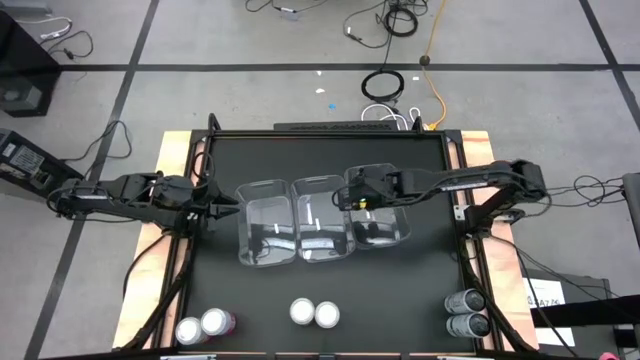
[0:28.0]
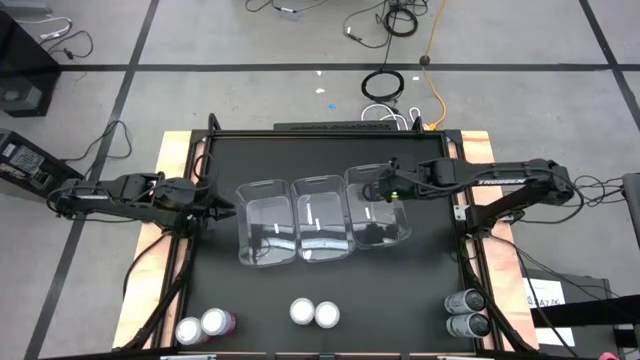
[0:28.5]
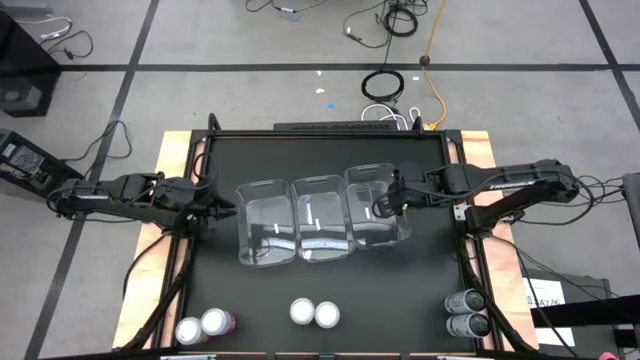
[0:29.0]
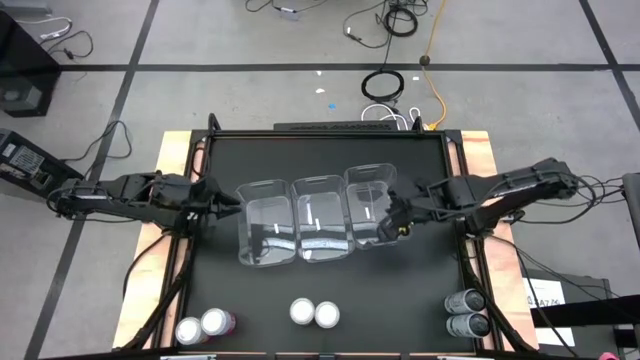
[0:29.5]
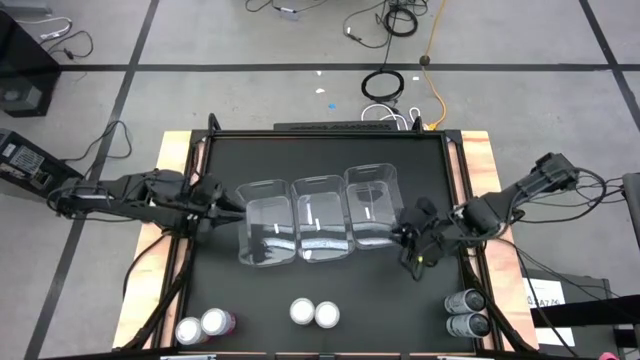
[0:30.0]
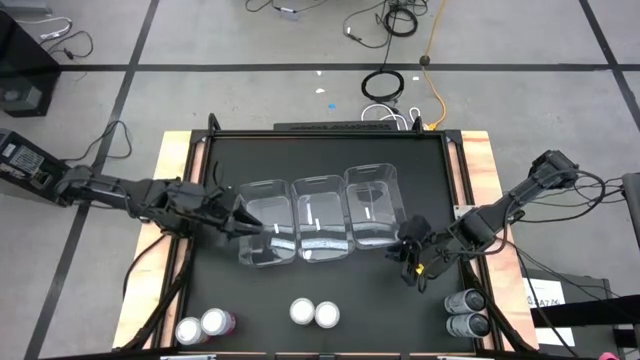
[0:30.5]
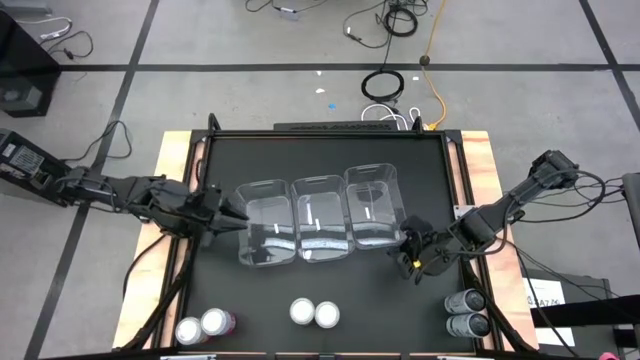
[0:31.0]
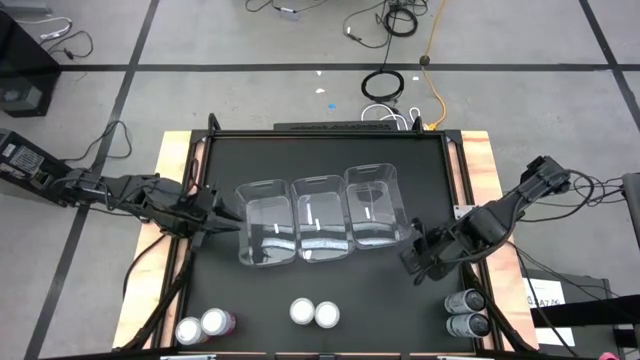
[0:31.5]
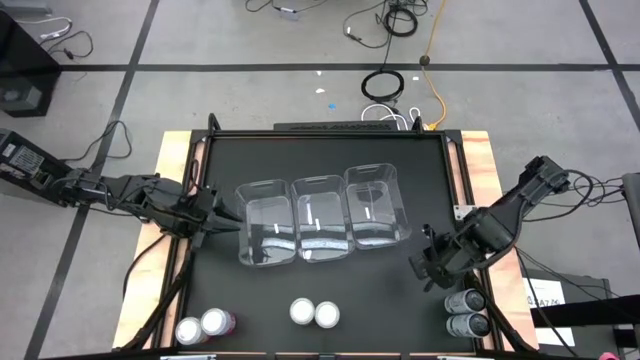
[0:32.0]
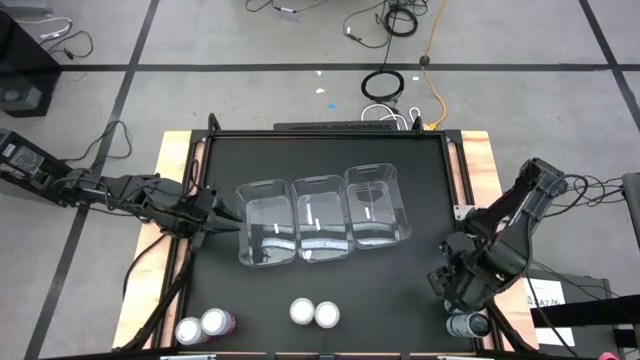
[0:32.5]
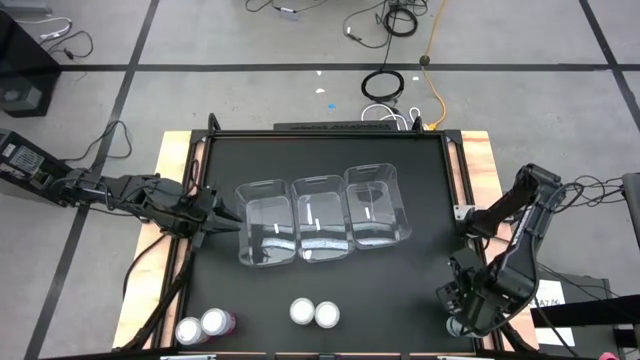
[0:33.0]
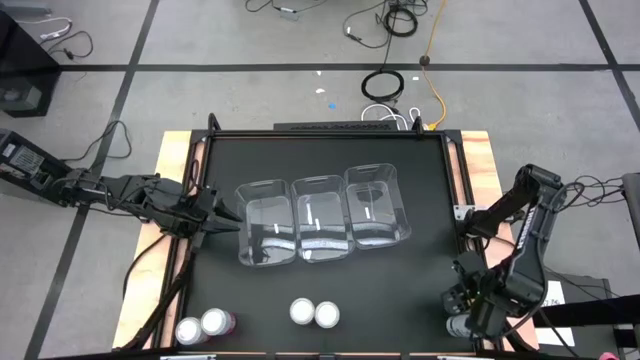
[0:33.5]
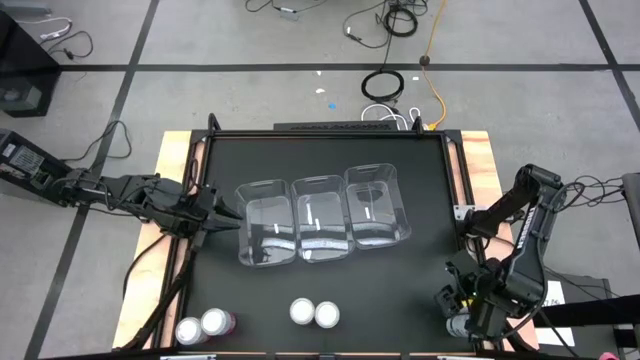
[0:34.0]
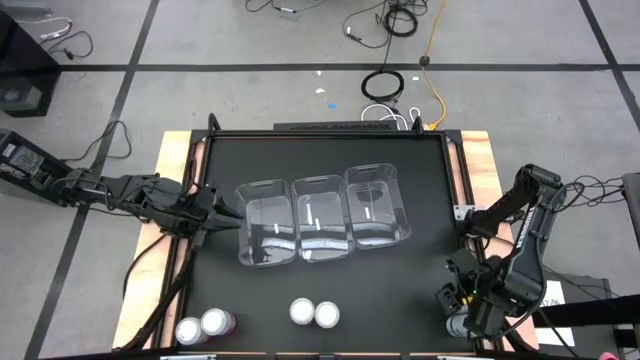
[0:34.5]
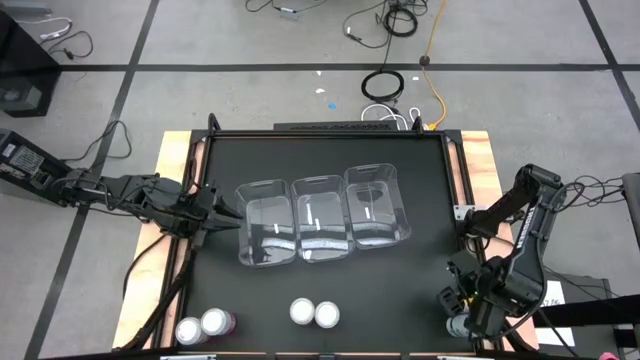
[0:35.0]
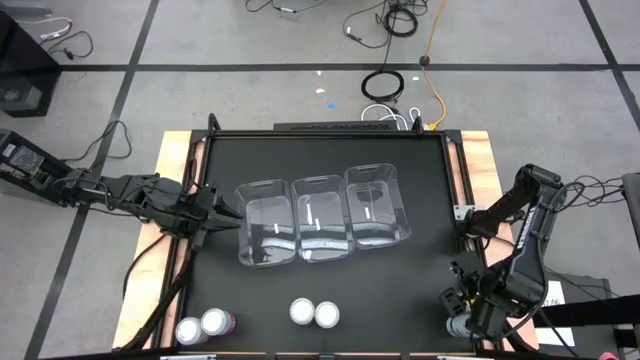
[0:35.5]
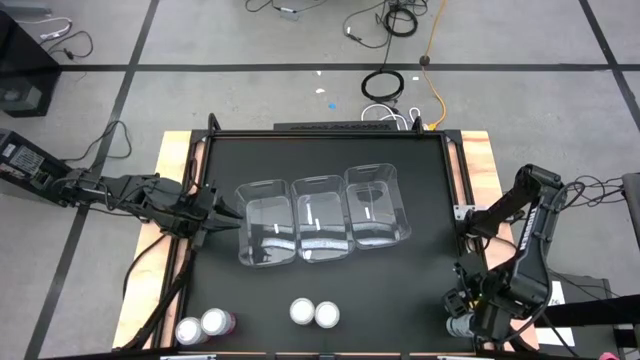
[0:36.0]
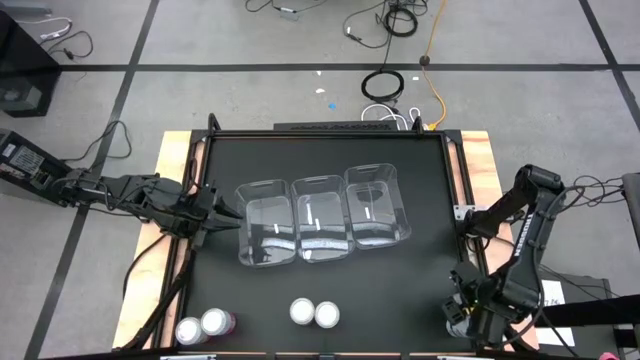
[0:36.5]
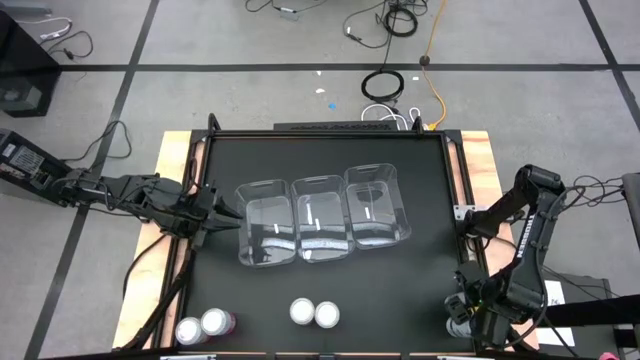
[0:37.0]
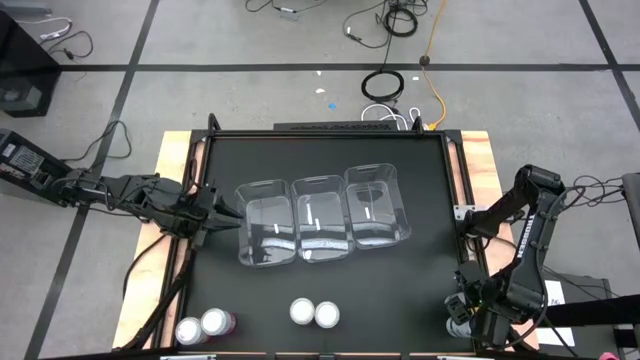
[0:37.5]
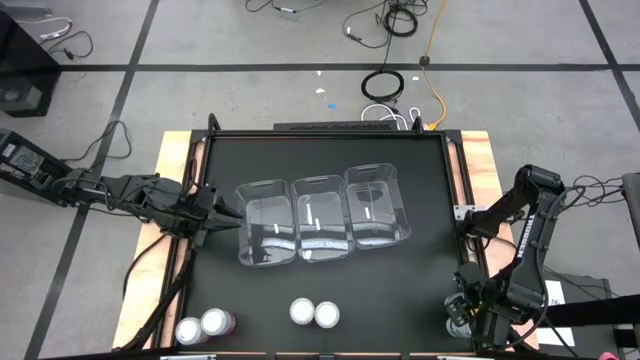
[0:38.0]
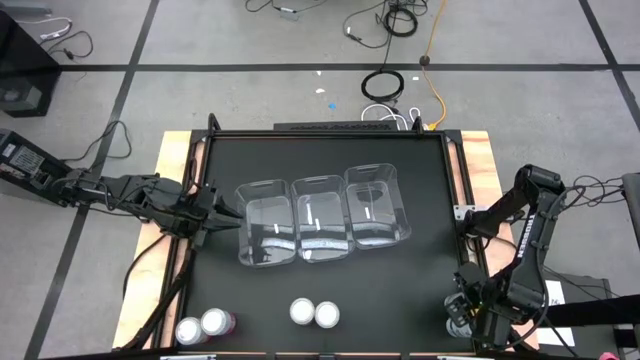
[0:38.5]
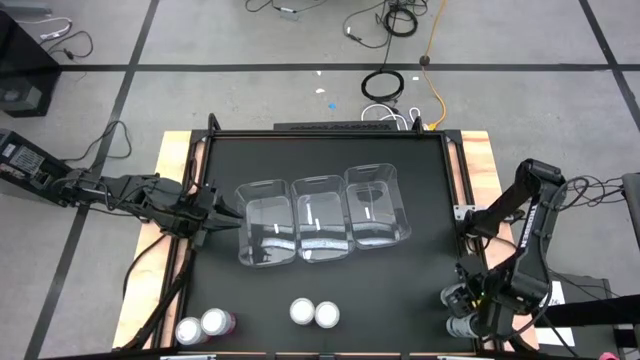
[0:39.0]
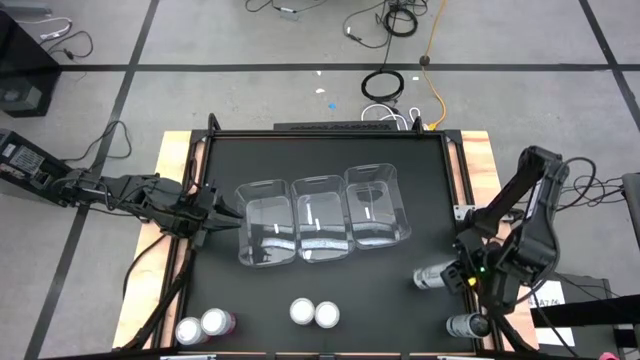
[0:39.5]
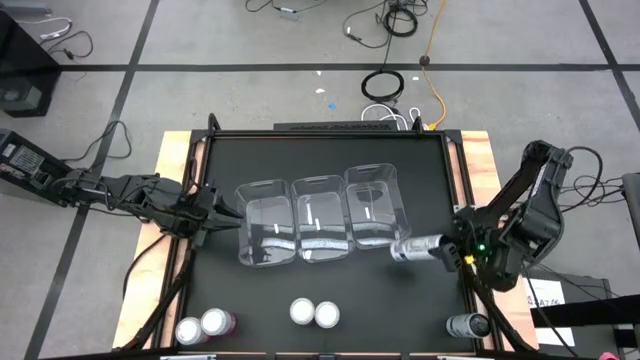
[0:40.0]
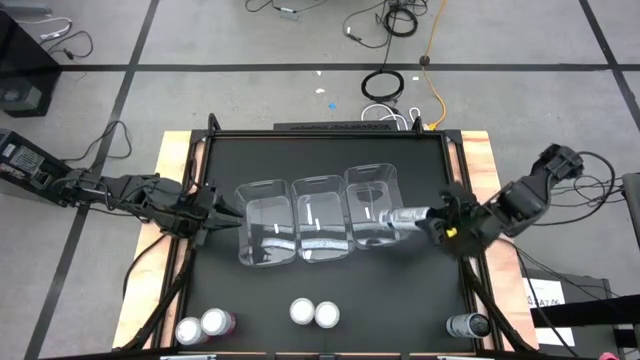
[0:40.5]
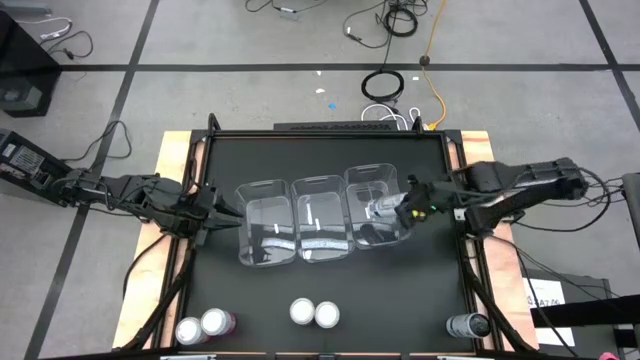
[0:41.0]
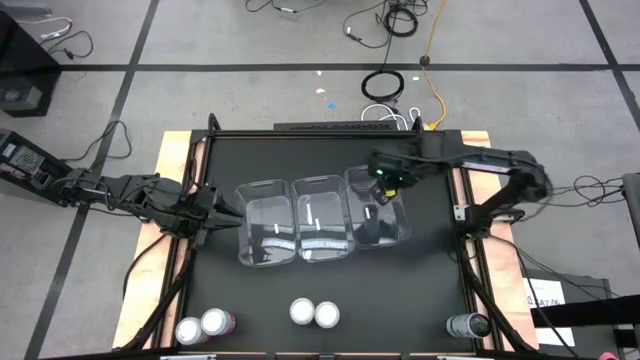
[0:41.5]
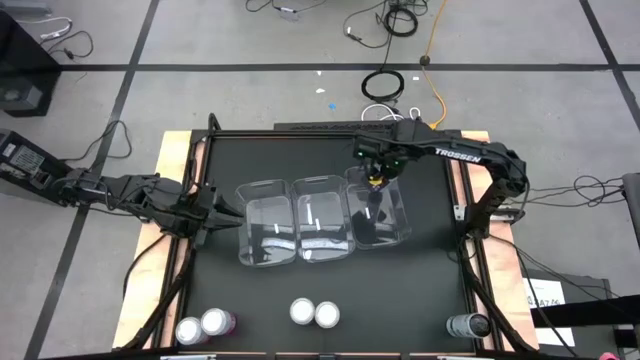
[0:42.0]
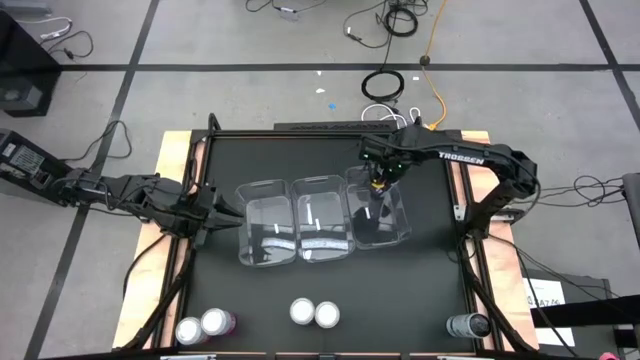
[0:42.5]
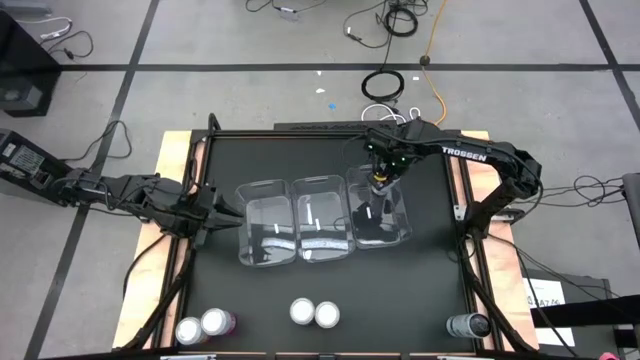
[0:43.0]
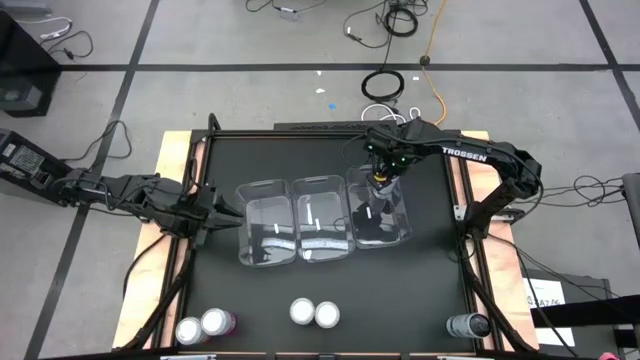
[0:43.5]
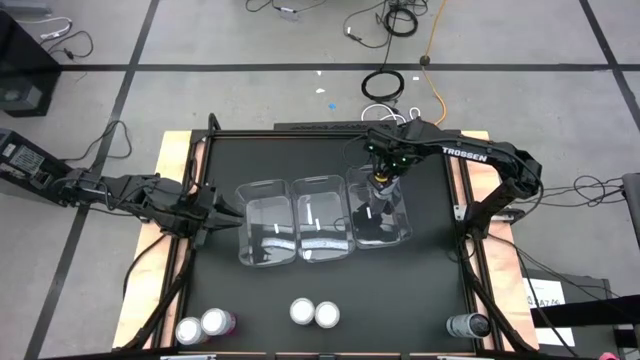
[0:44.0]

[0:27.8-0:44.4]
Task: Sort soda cans
Put the top black soda can into the right transparent bin

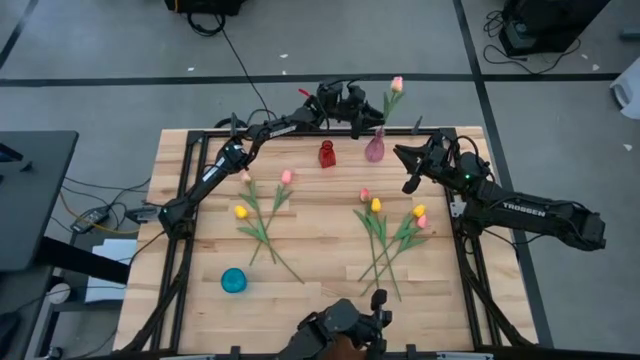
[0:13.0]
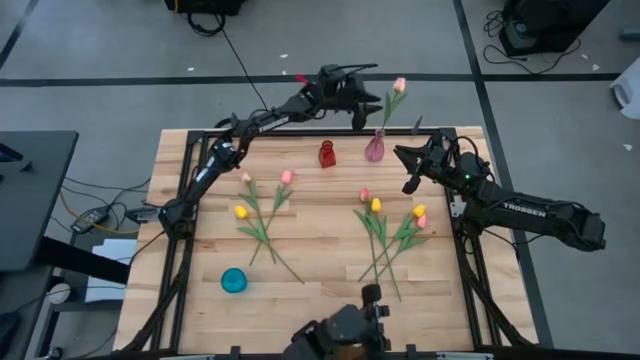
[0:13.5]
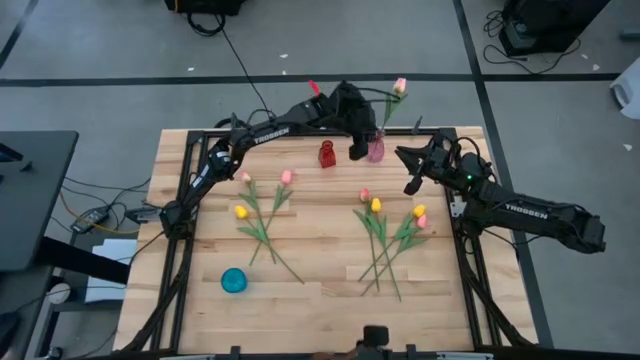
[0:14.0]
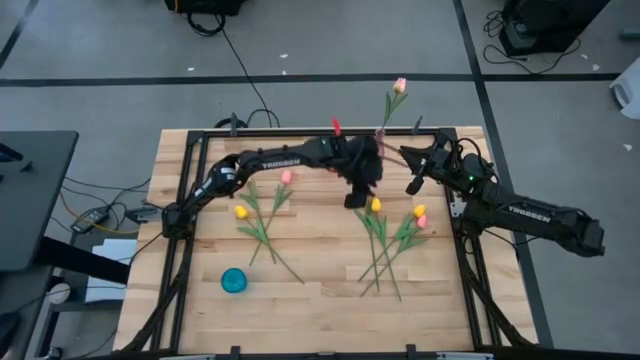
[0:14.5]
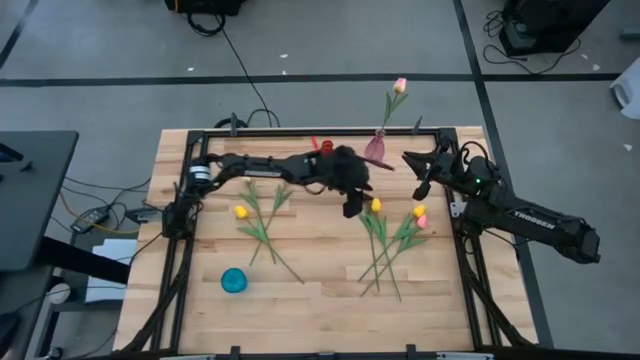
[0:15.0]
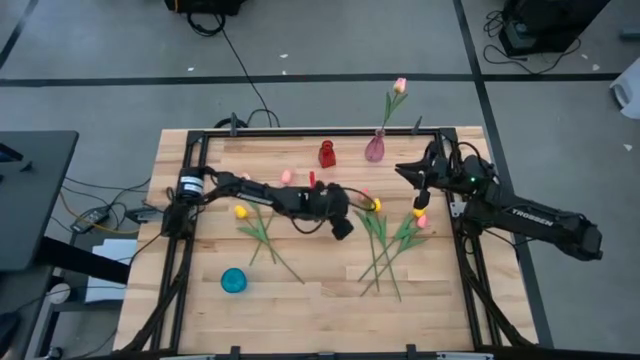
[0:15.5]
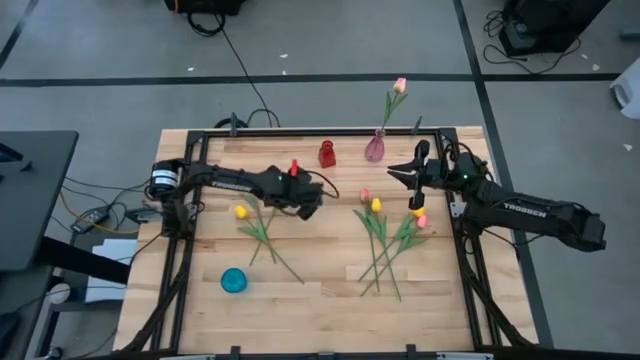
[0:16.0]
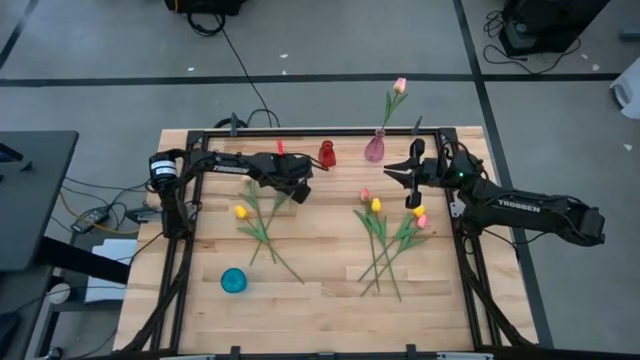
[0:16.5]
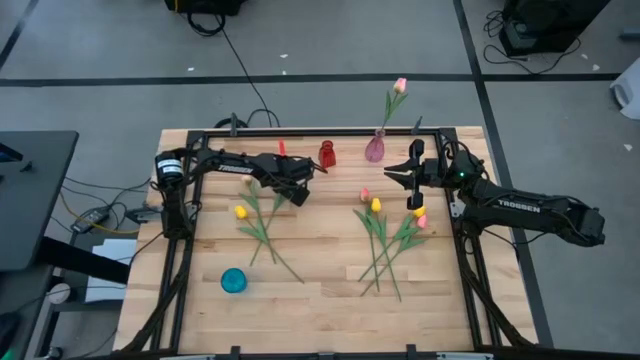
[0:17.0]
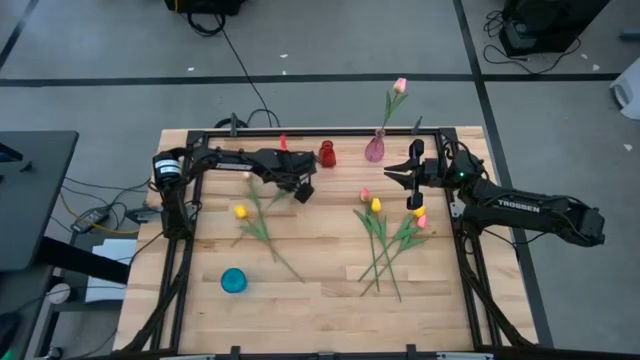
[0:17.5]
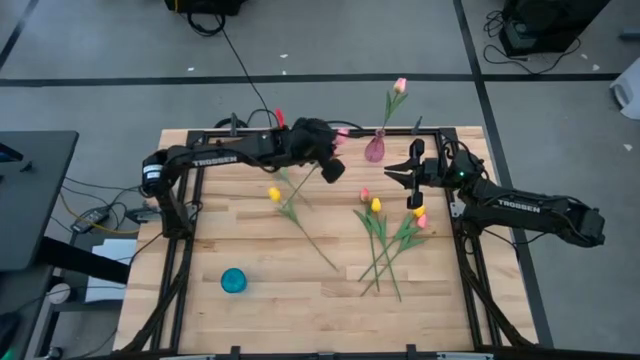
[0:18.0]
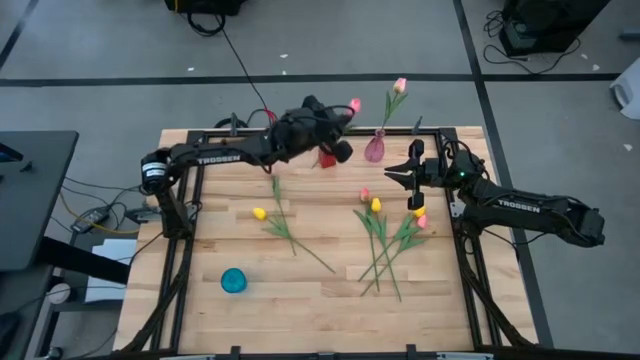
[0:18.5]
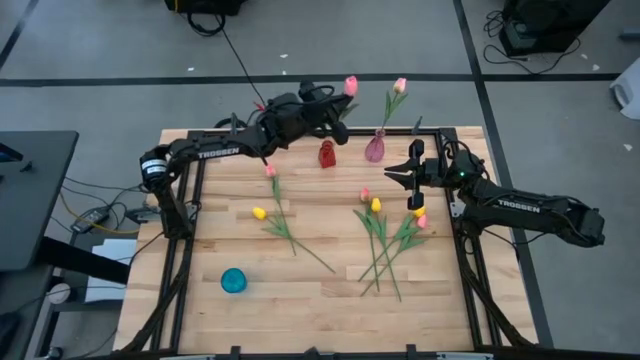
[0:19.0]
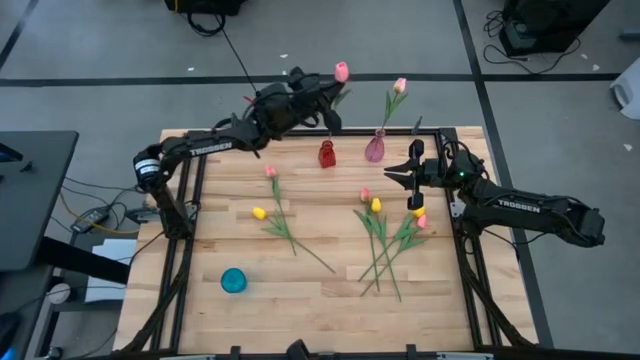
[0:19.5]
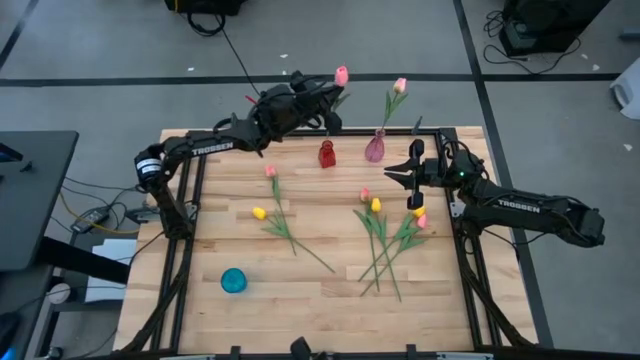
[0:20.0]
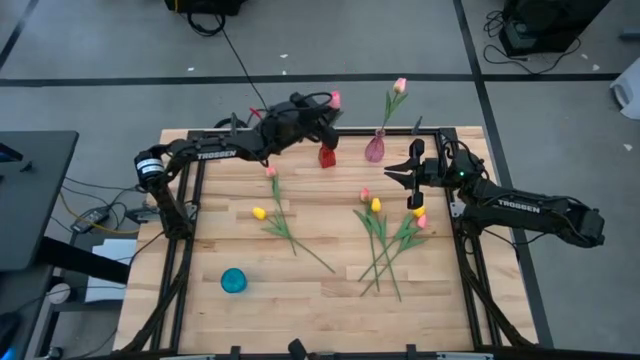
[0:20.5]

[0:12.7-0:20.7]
Task: Sort flowers into vase by color
Put the pink tulip into the red vase
